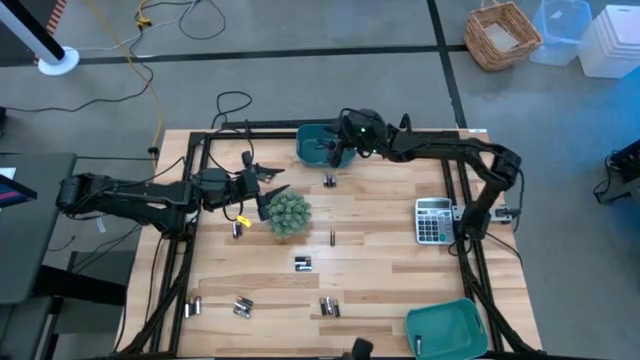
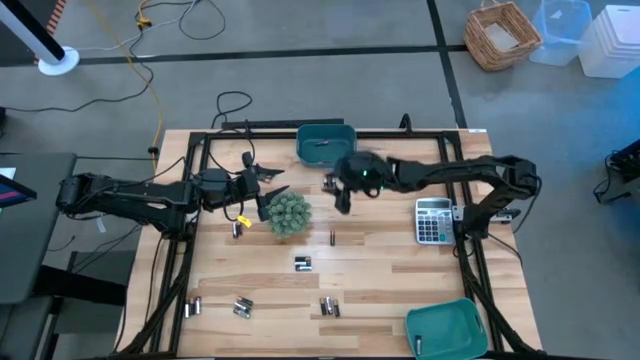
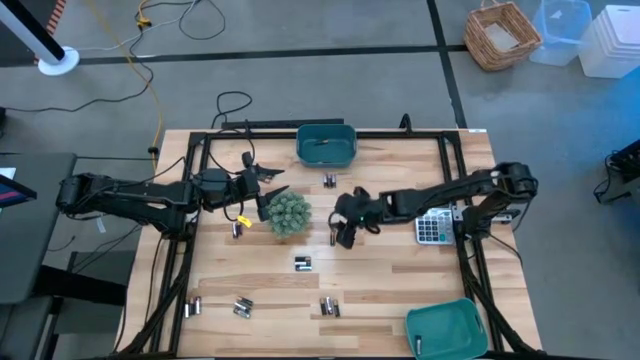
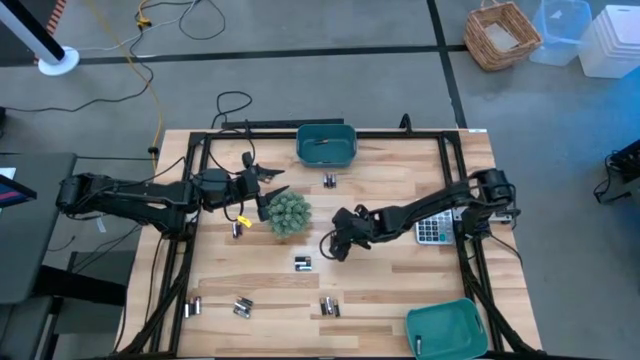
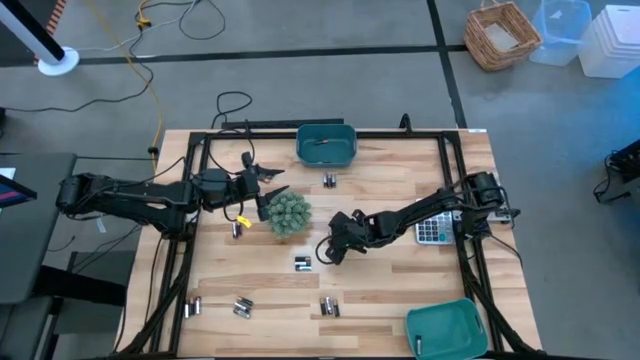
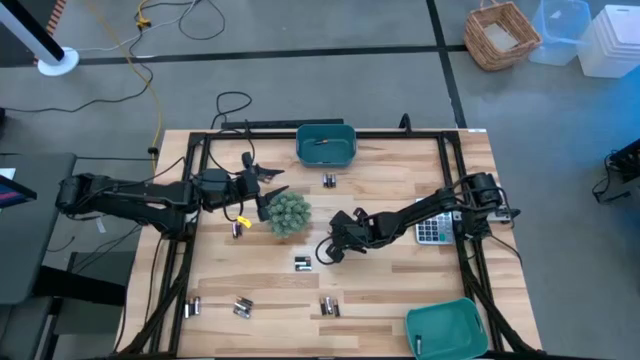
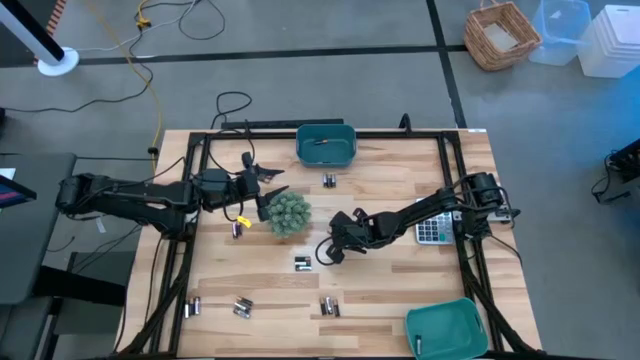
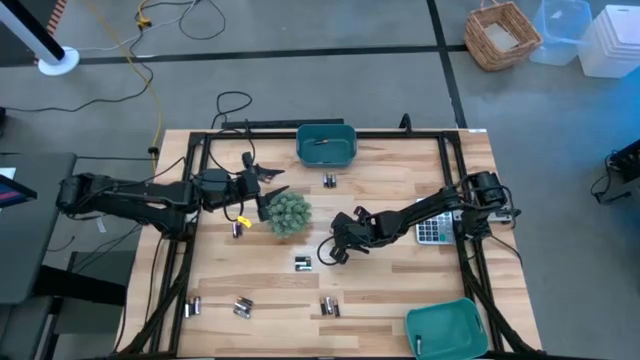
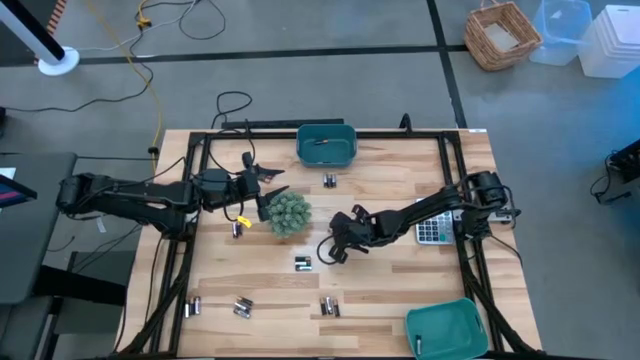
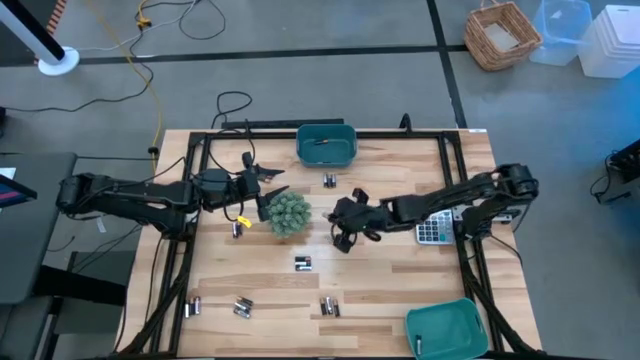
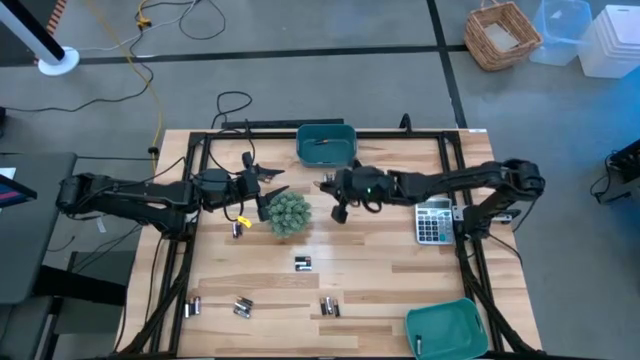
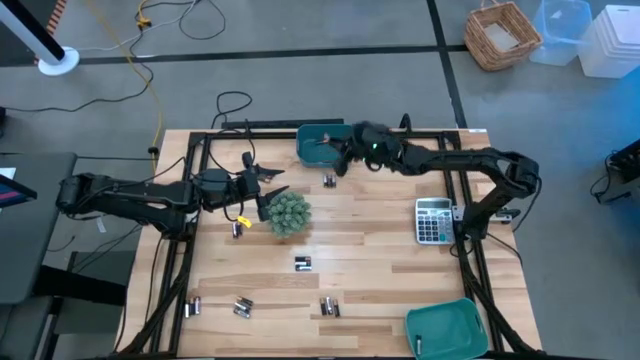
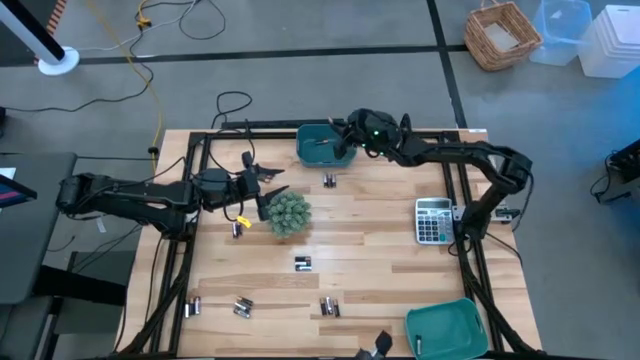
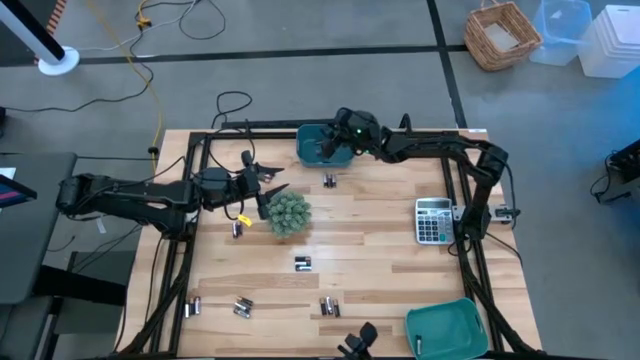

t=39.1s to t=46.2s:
Task: Sort batteries
Put the black battery into the blue bin

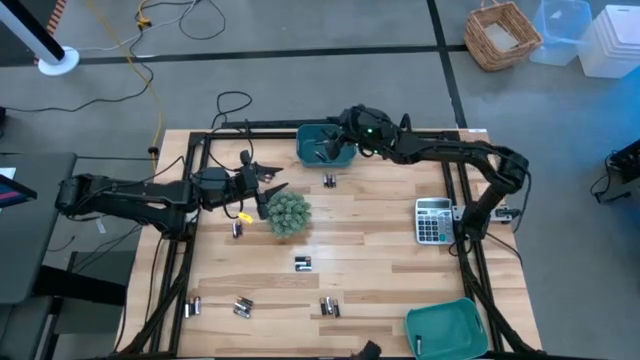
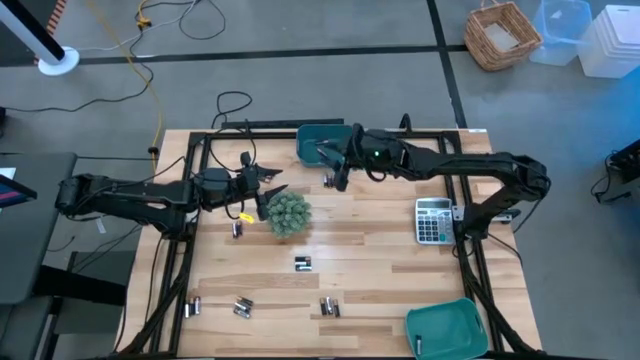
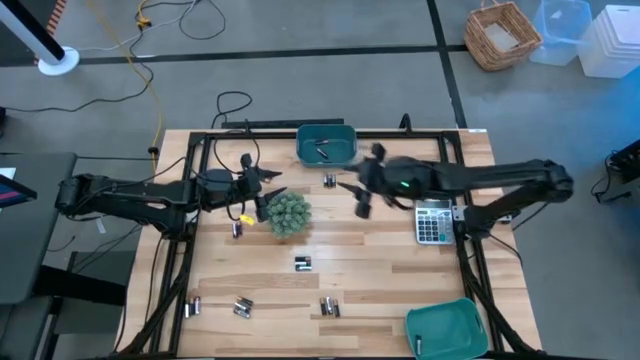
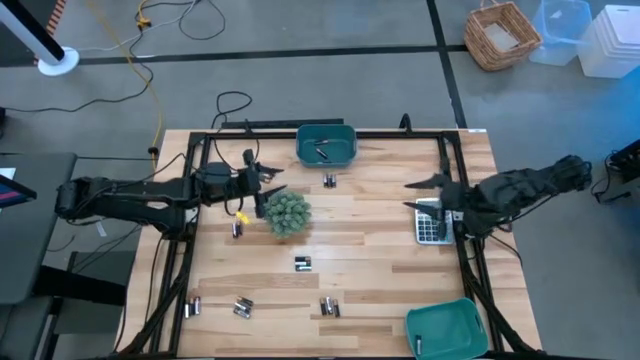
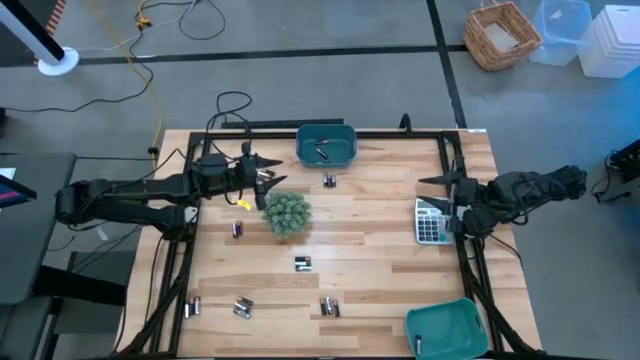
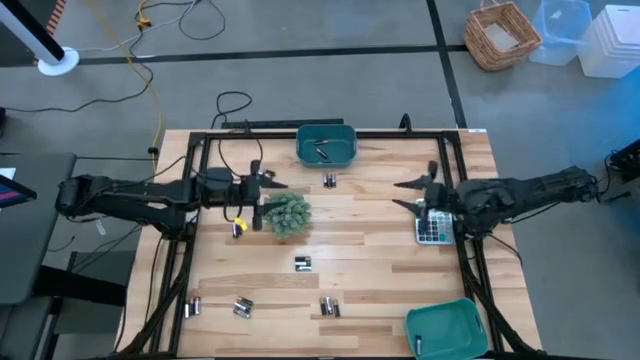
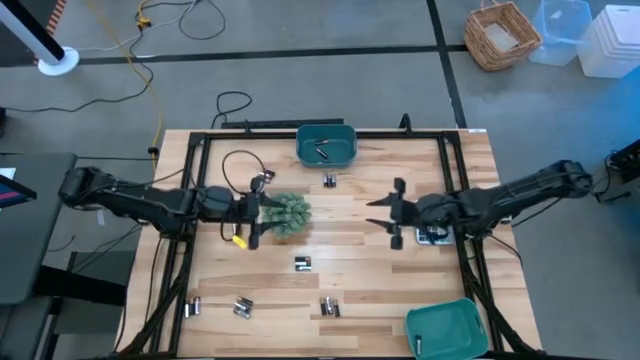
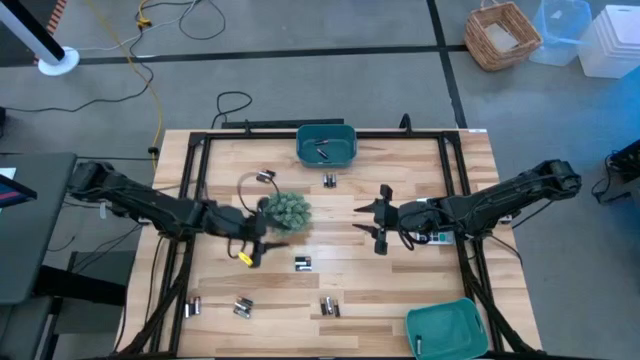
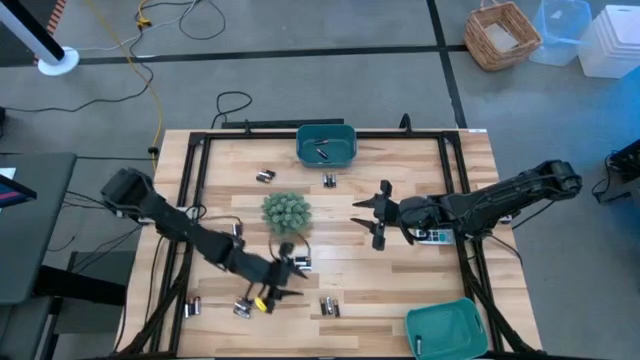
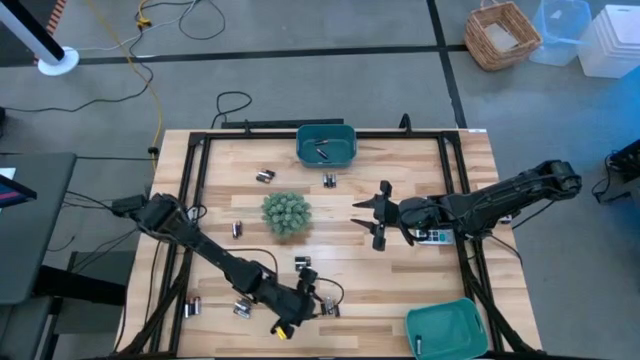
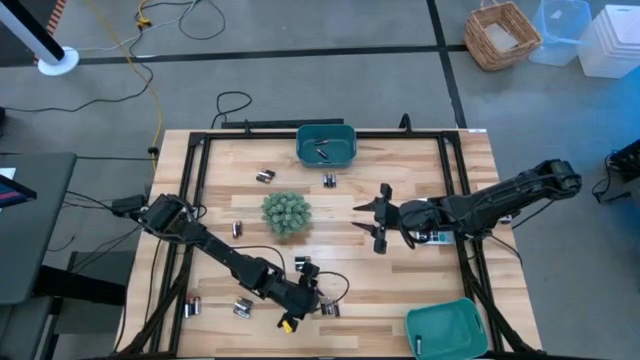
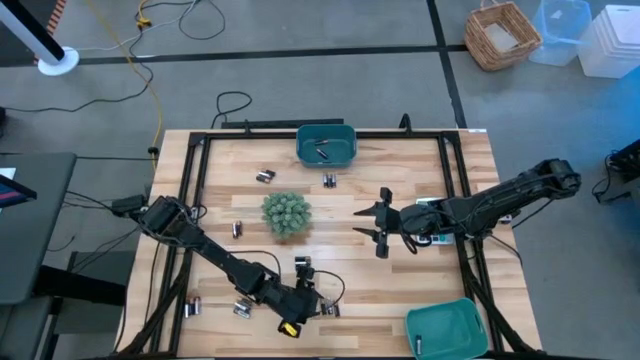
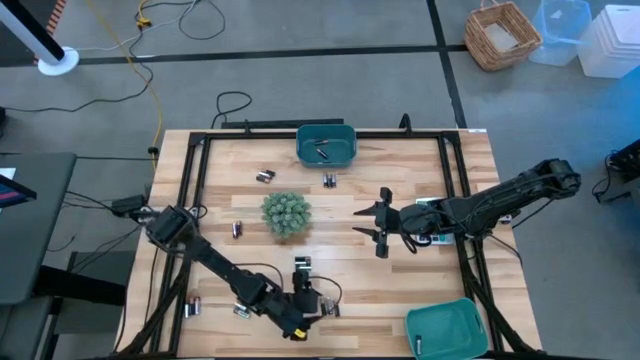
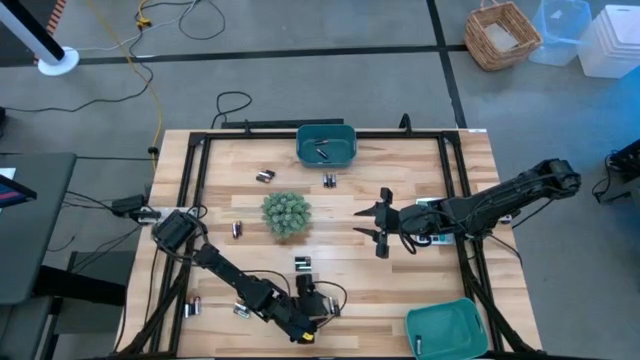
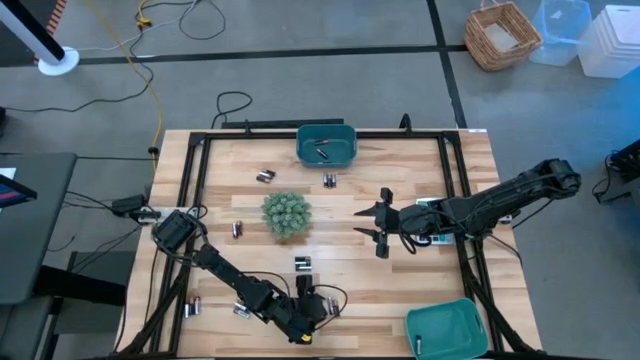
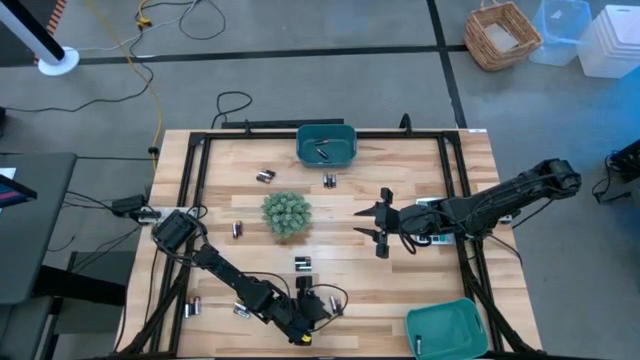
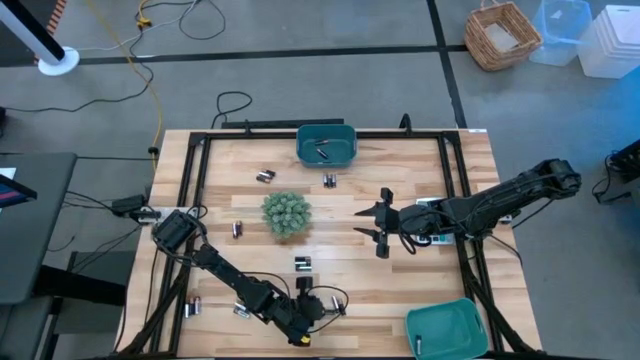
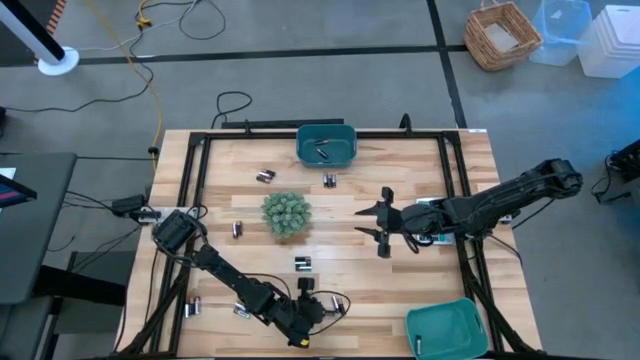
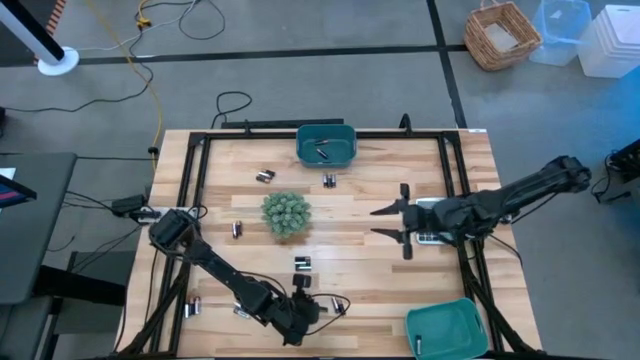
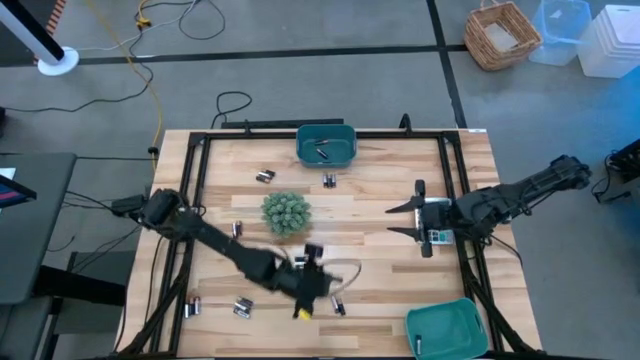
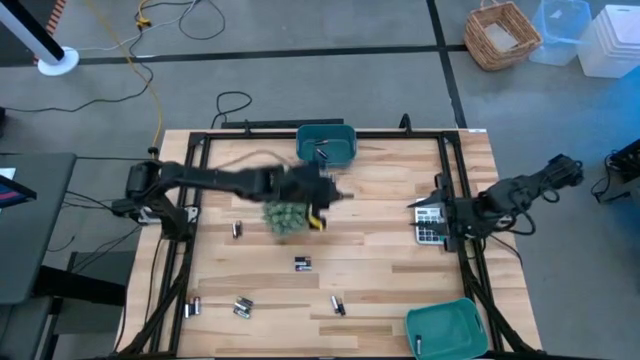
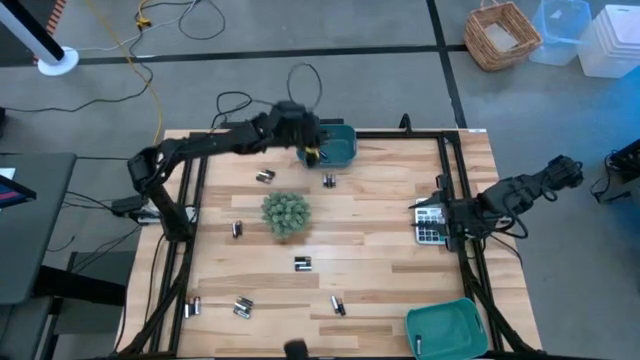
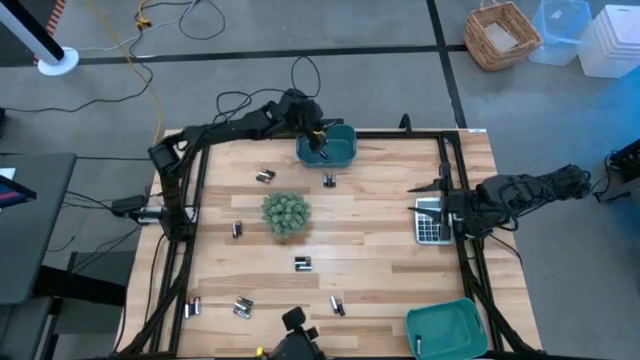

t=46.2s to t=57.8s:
Put the black battery into the blue bin

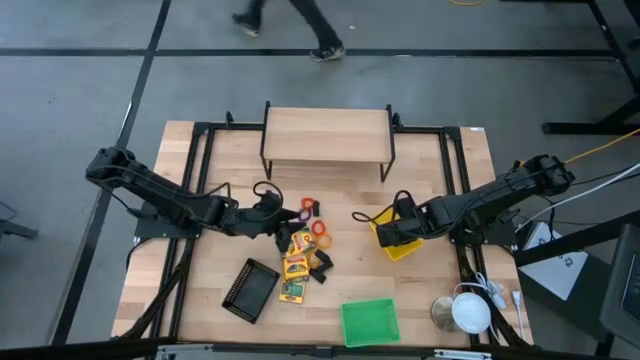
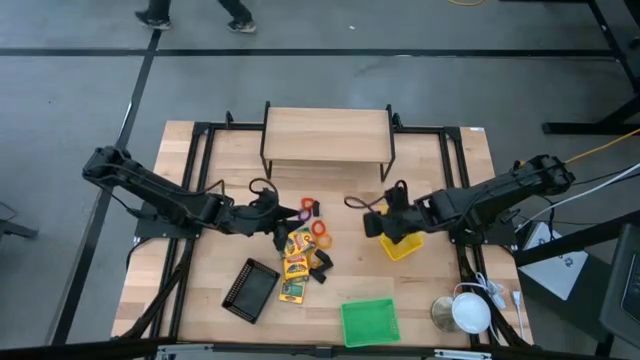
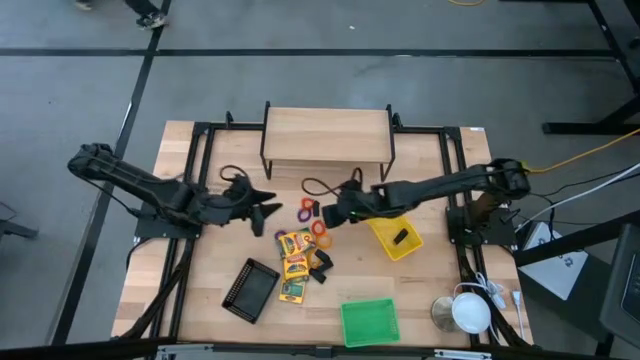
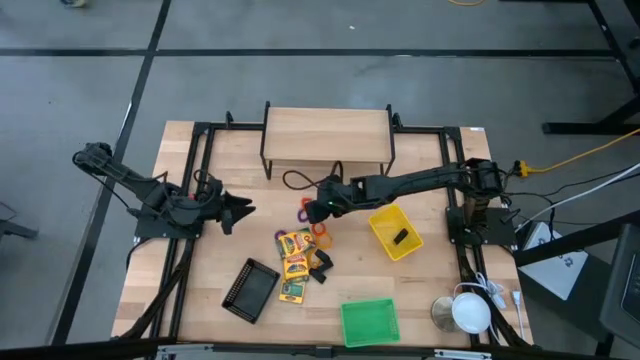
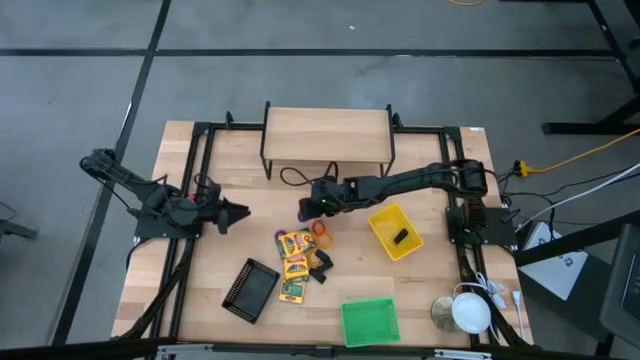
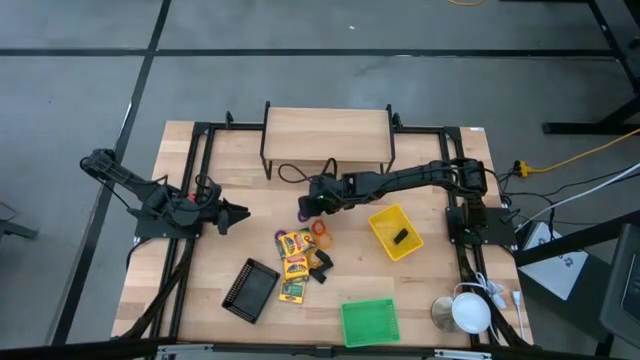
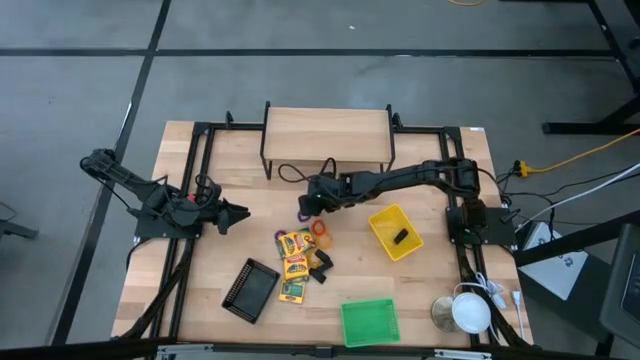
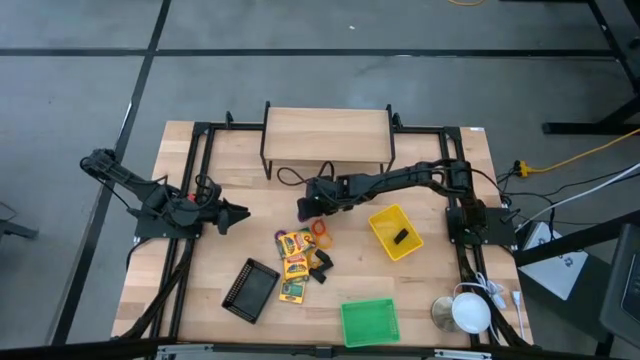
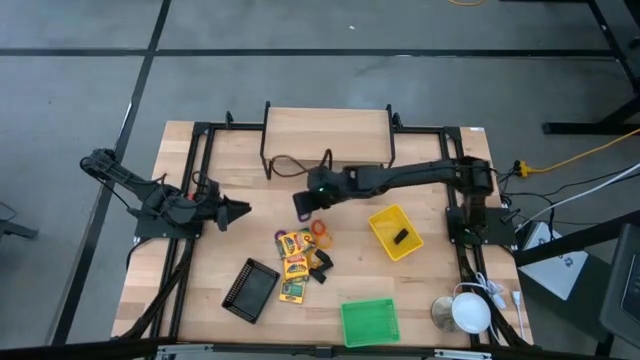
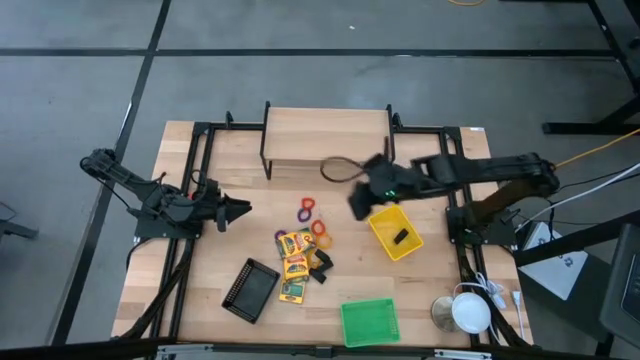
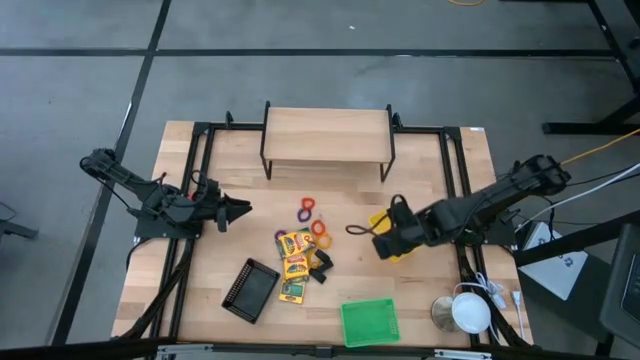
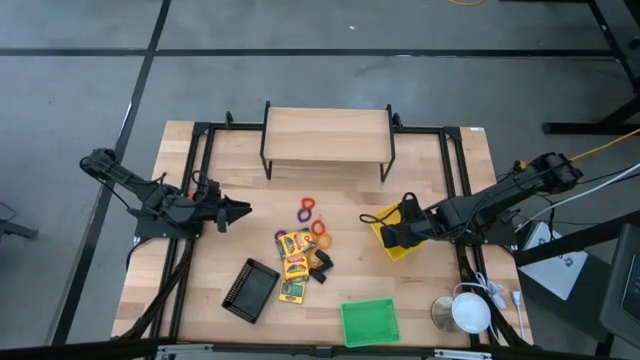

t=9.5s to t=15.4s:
Task: Pick & Place Office Desk Supplies
Put the black rubber band into the yellow basket
